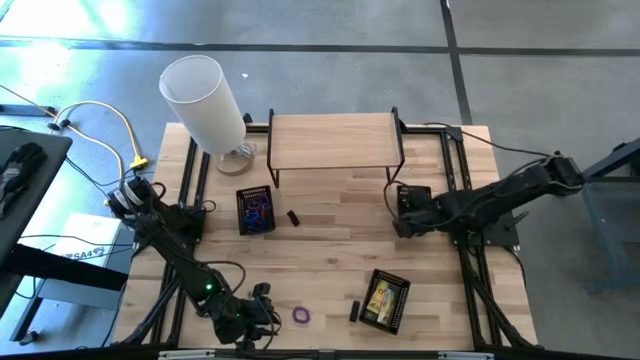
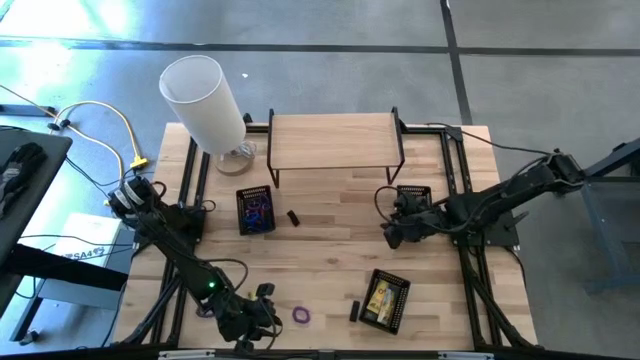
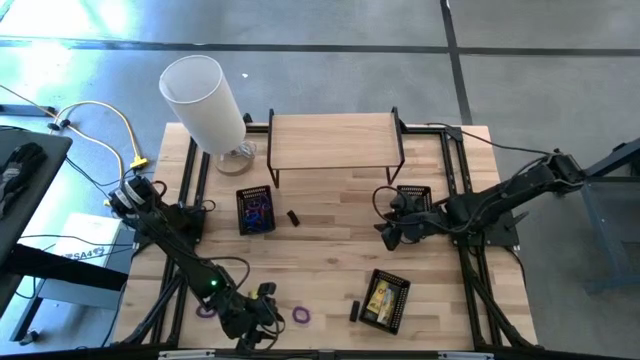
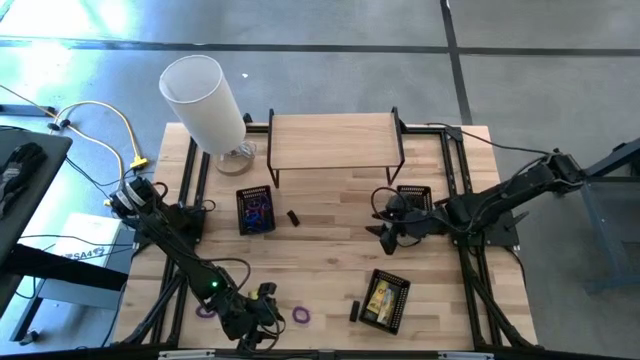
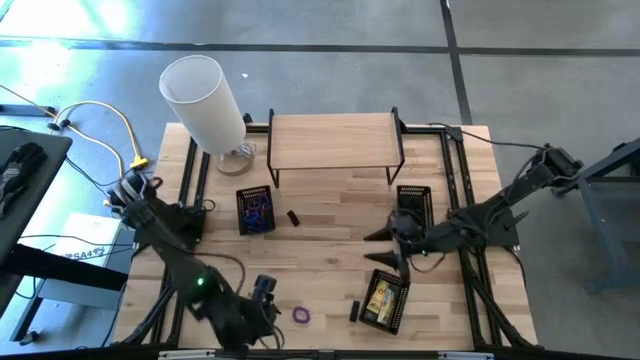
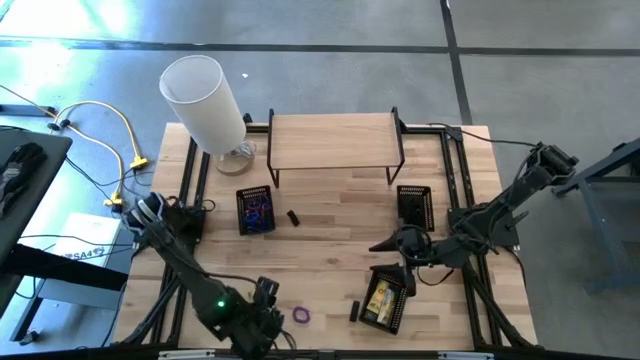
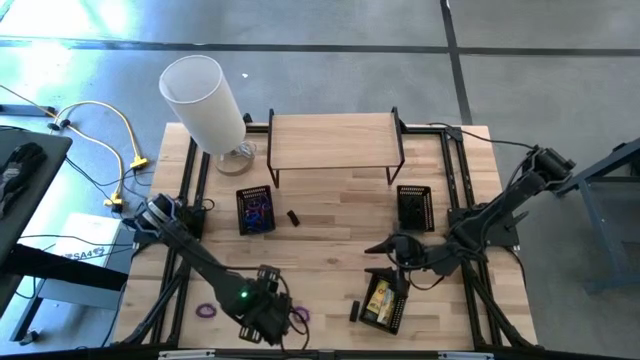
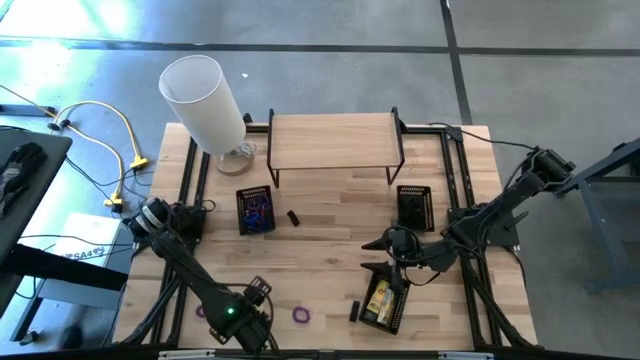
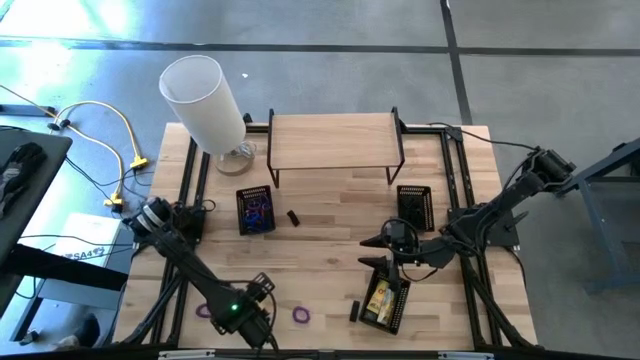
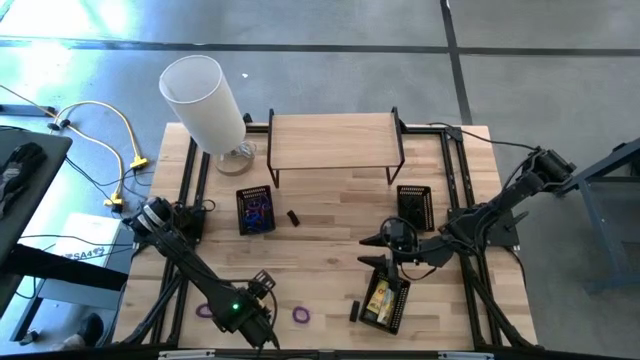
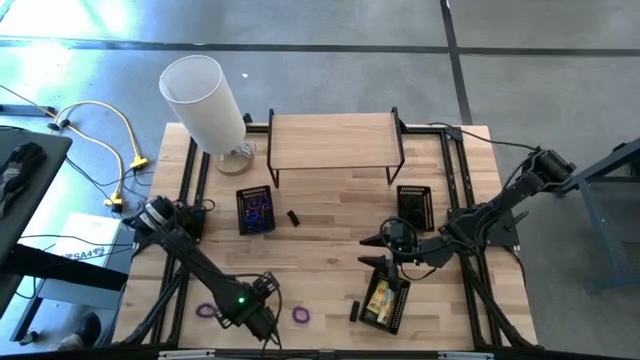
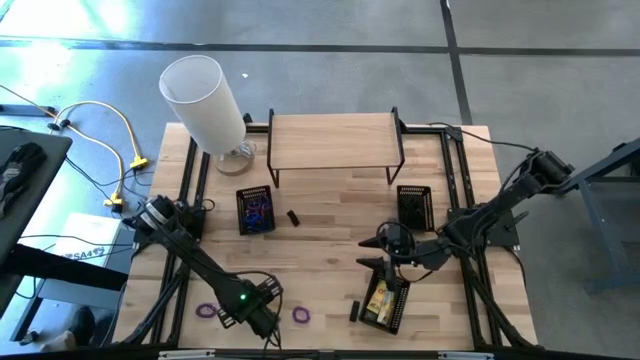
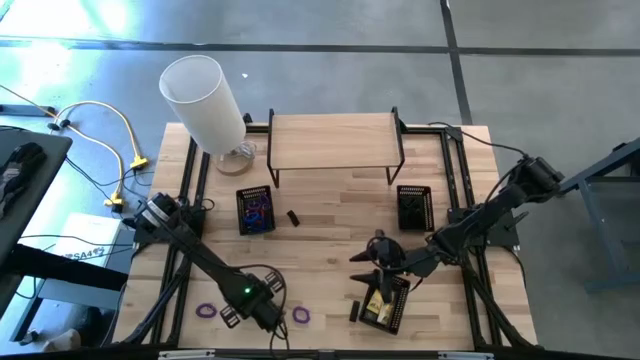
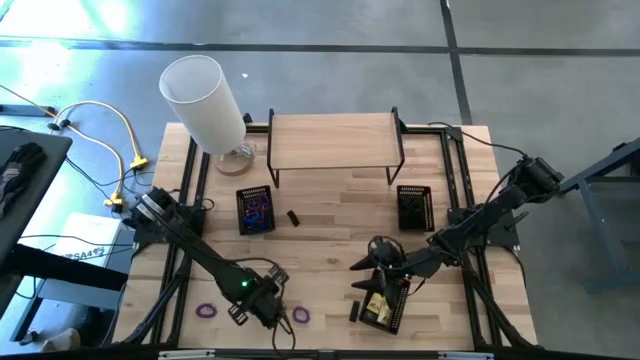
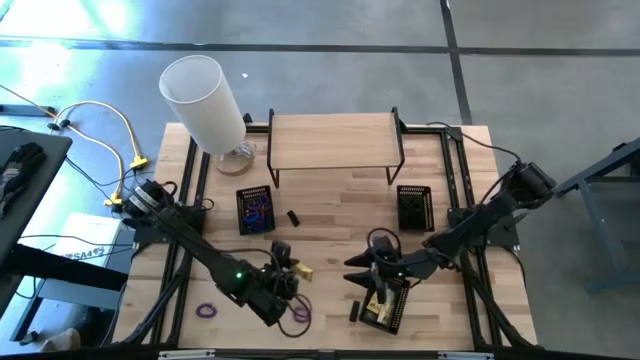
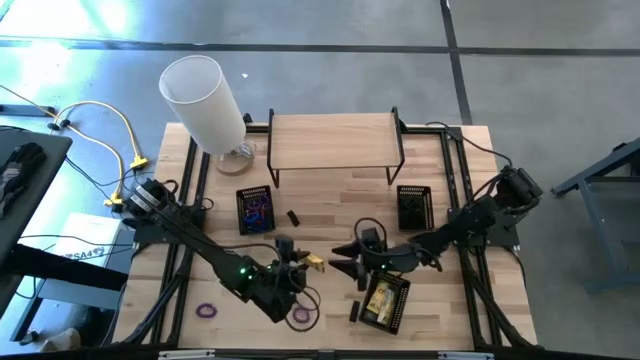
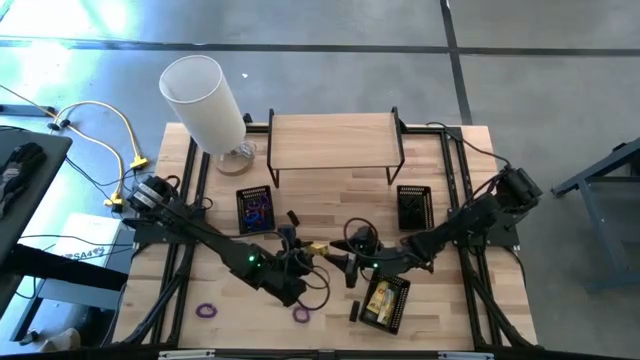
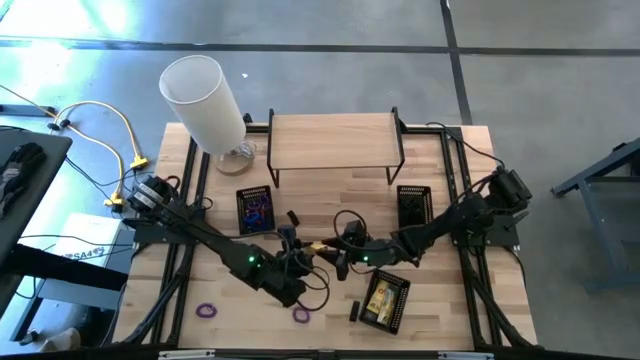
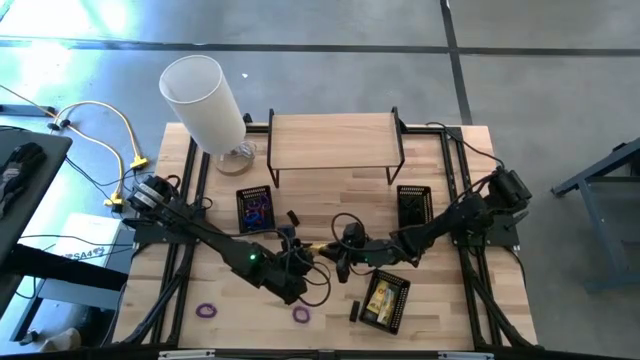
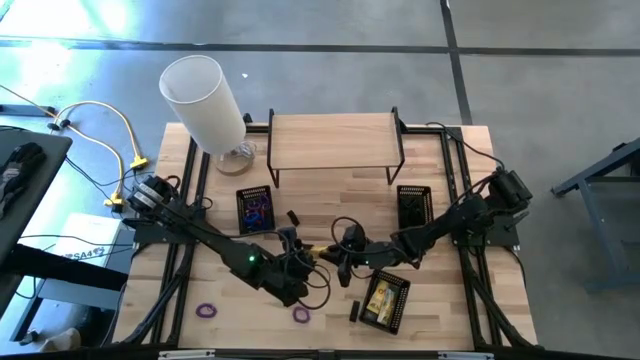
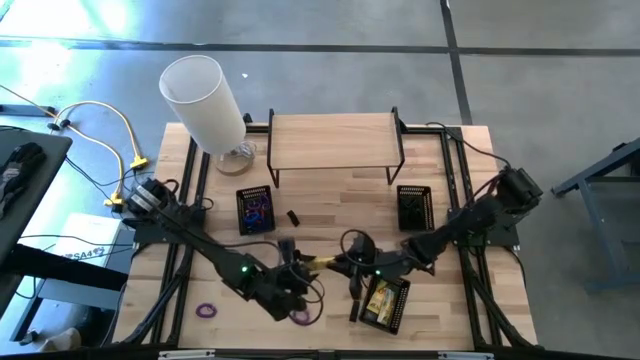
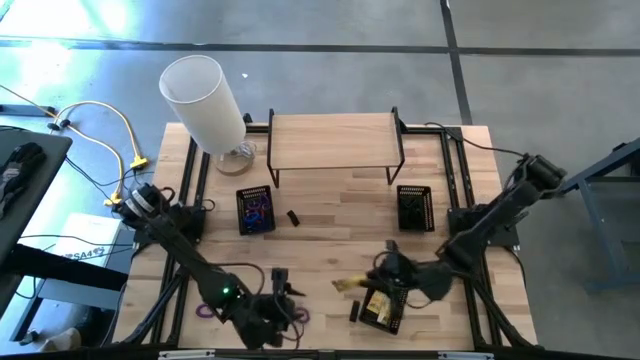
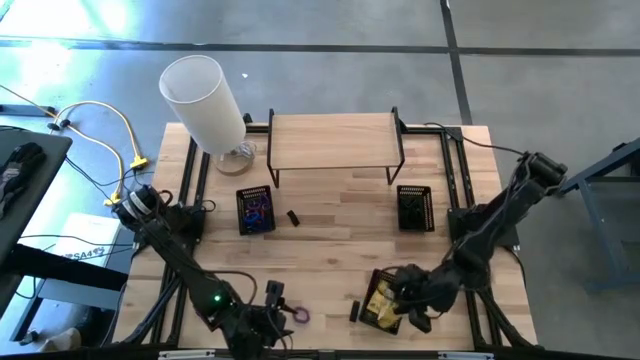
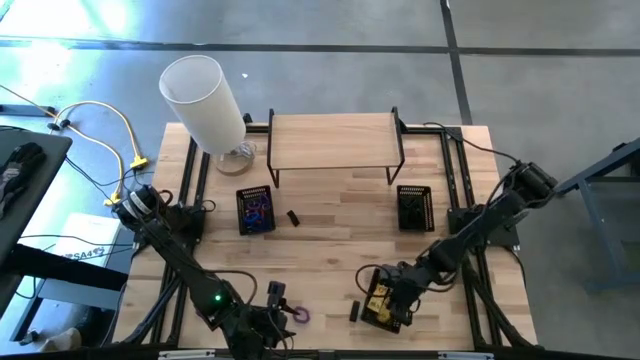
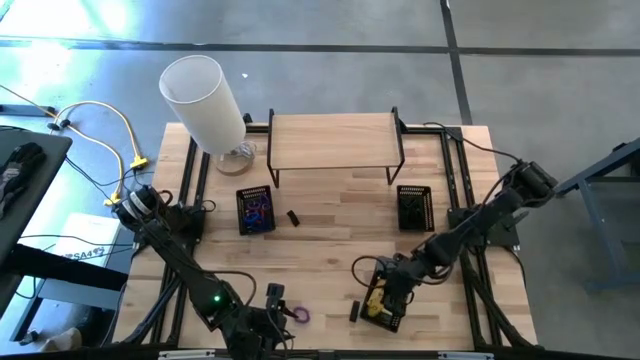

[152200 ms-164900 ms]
Task: Pick & Place Office Desk Supplies
Put the crayon box into the bottom bin

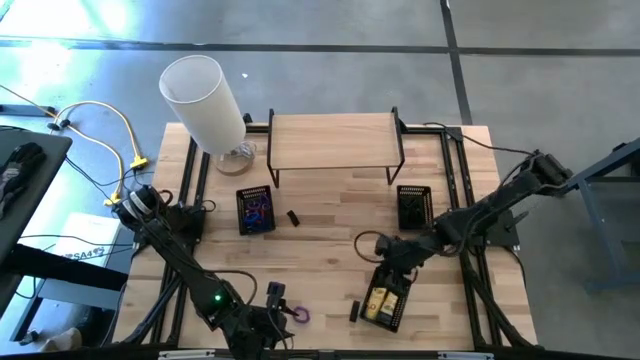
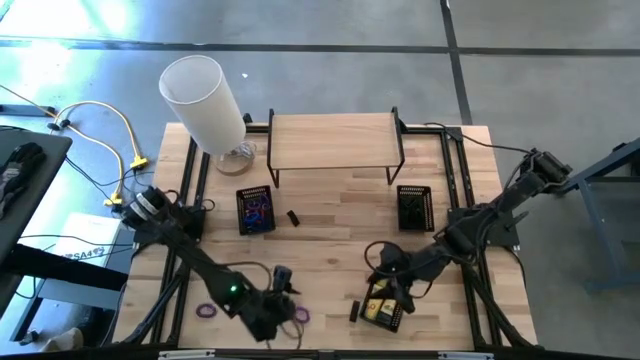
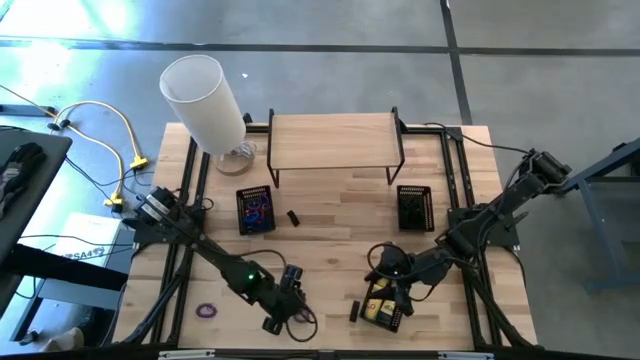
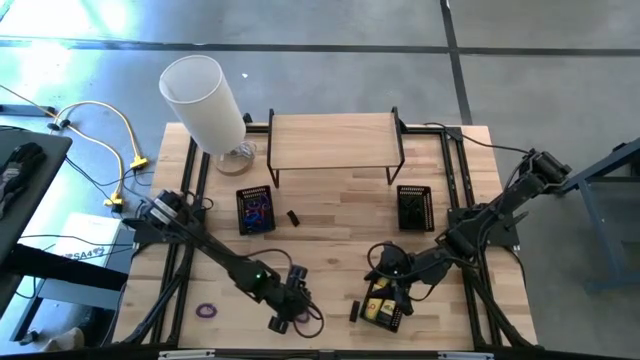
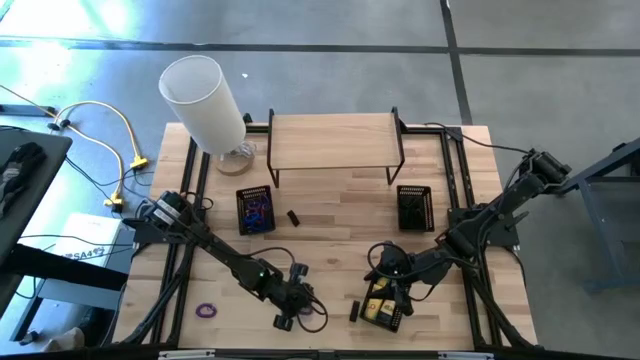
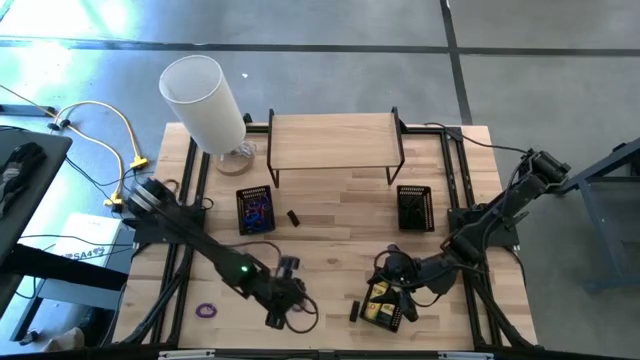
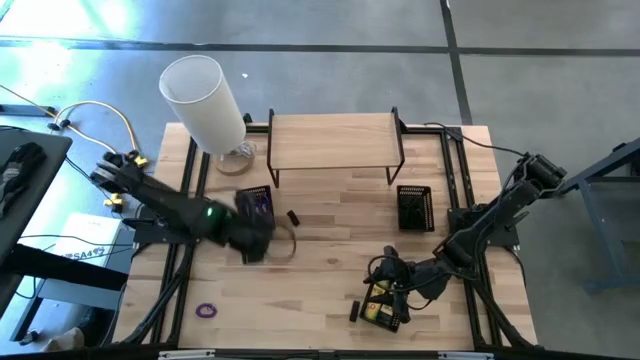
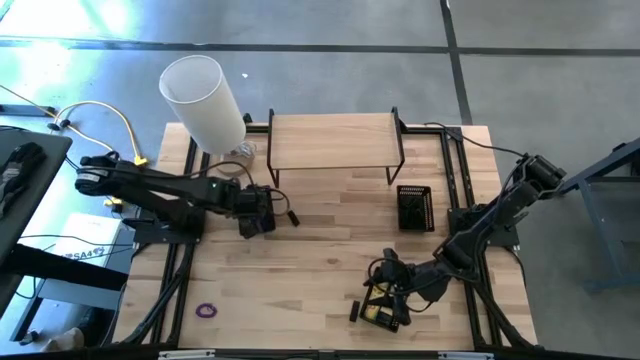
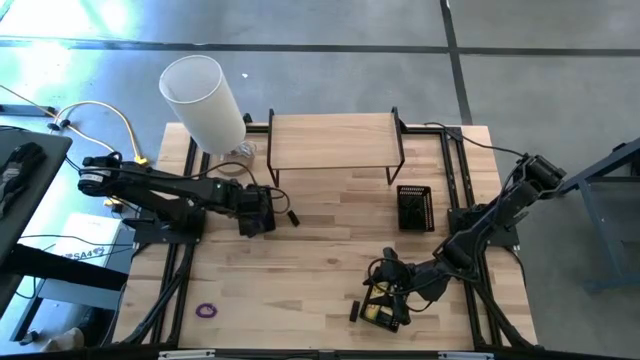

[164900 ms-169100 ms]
Put the right purple spiral keychain into the top left bin

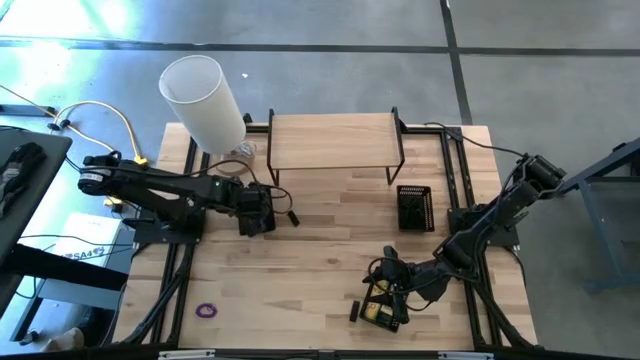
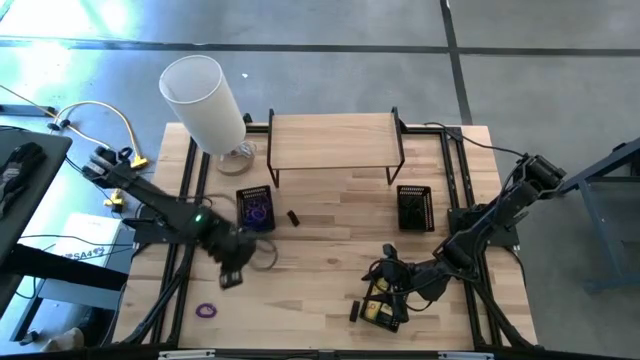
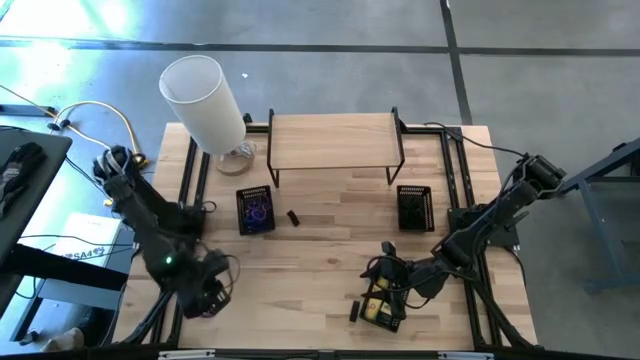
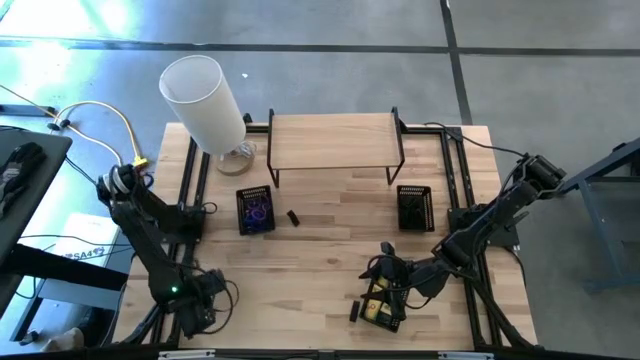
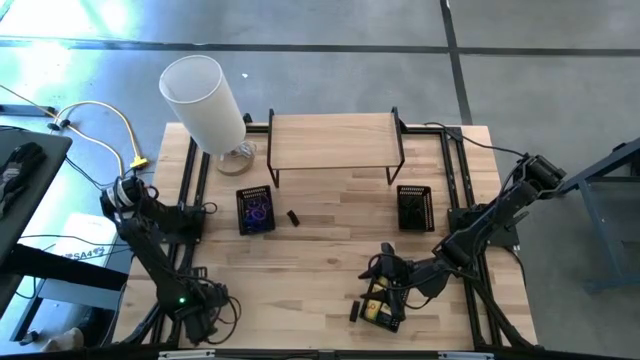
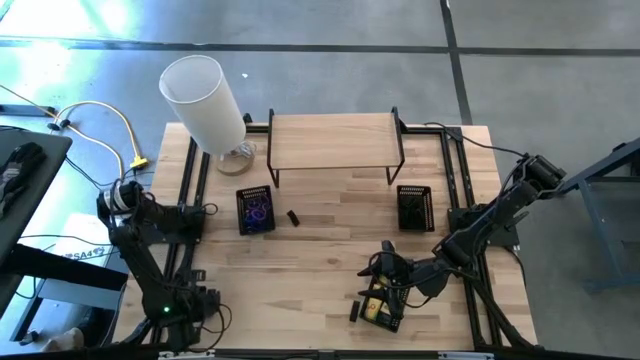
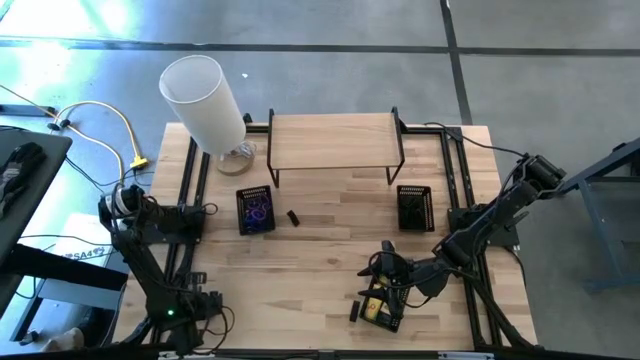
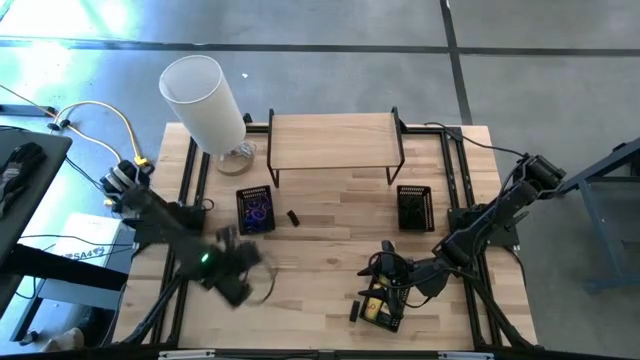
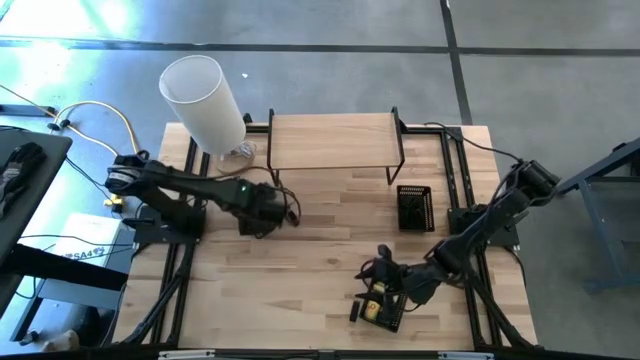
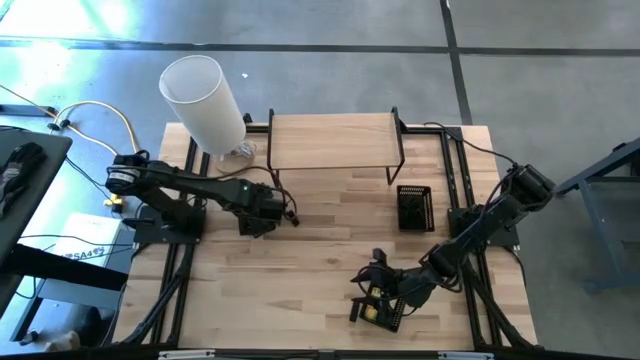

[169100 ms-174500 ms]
Put the purple spiral keychain into the bottom bin
